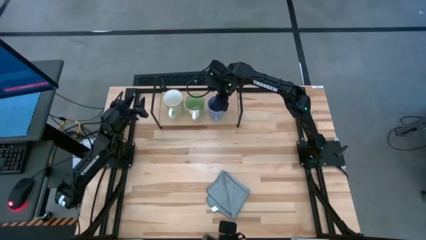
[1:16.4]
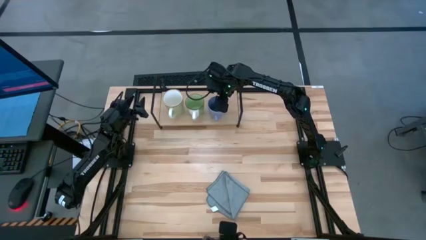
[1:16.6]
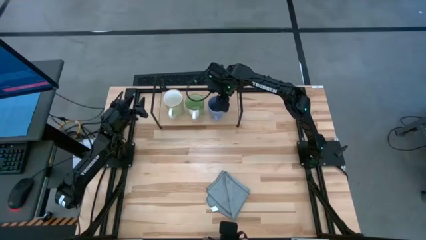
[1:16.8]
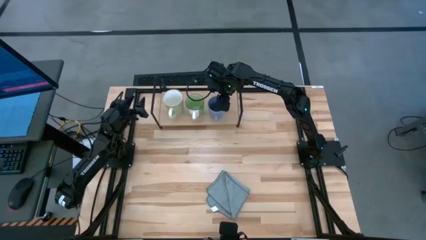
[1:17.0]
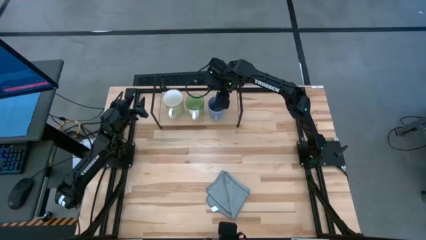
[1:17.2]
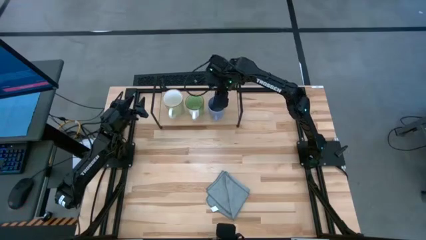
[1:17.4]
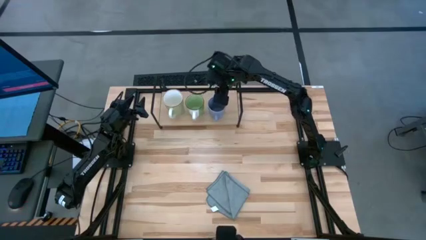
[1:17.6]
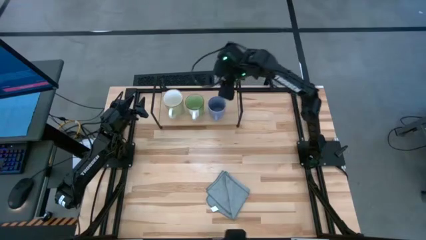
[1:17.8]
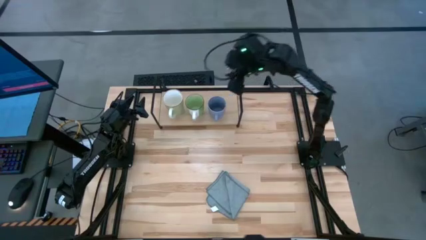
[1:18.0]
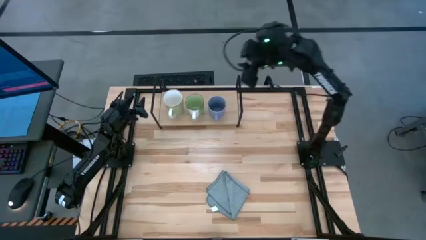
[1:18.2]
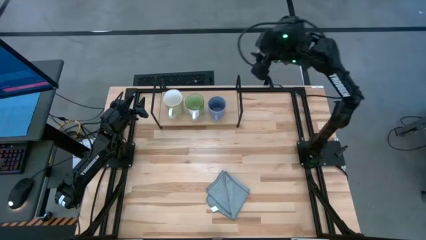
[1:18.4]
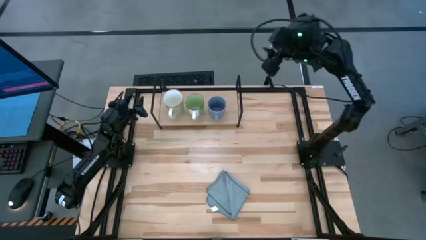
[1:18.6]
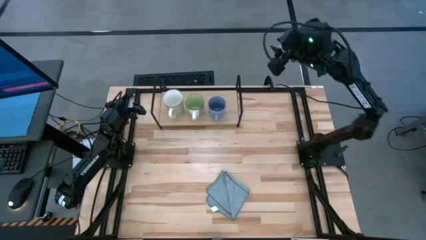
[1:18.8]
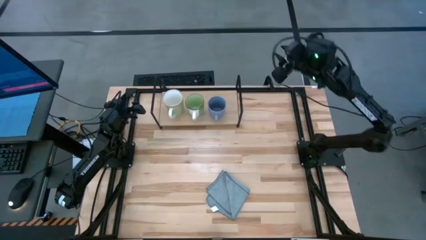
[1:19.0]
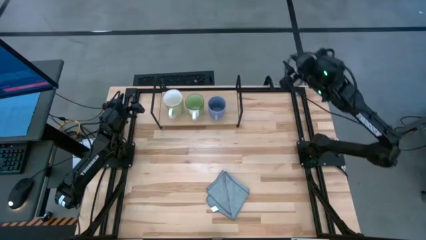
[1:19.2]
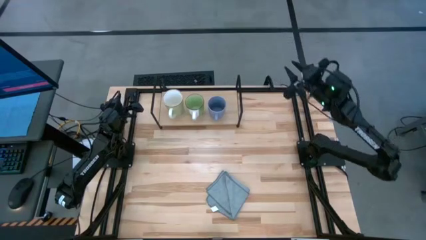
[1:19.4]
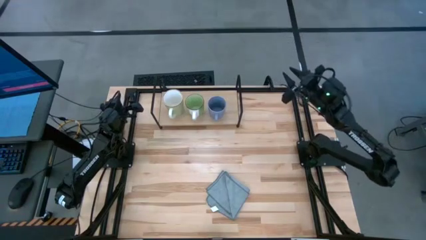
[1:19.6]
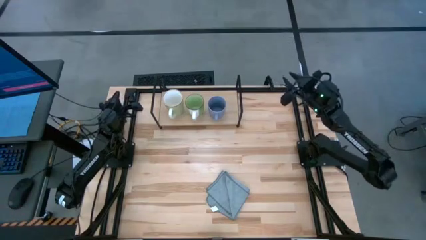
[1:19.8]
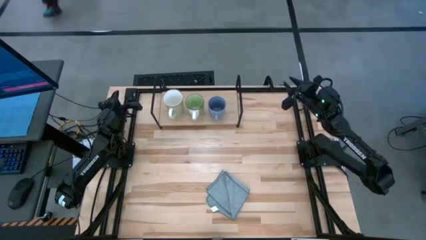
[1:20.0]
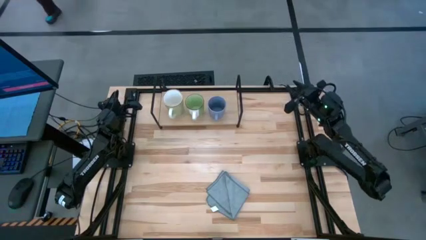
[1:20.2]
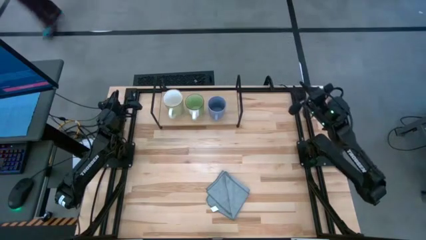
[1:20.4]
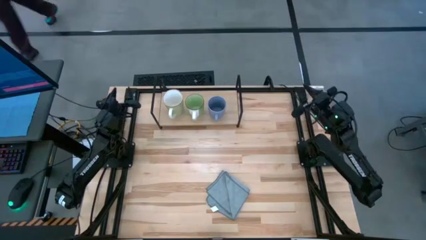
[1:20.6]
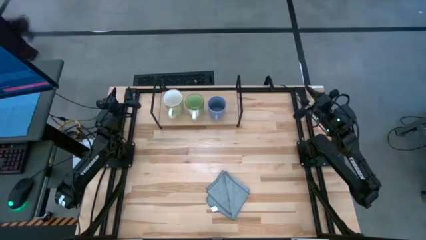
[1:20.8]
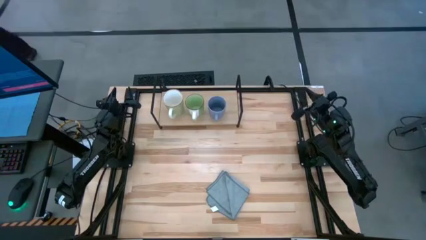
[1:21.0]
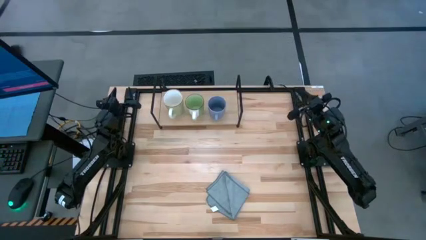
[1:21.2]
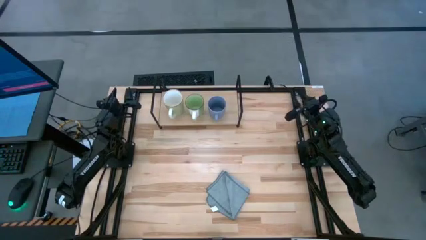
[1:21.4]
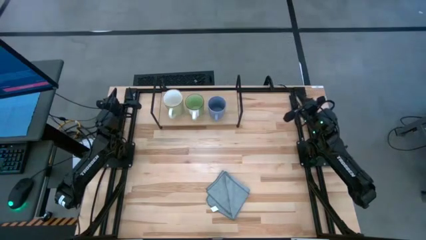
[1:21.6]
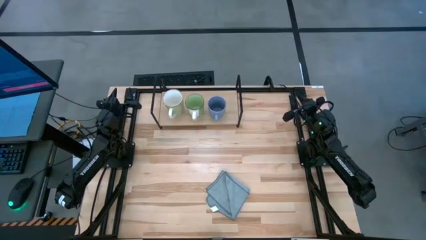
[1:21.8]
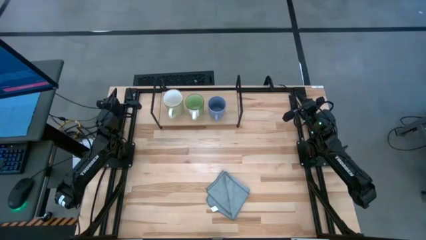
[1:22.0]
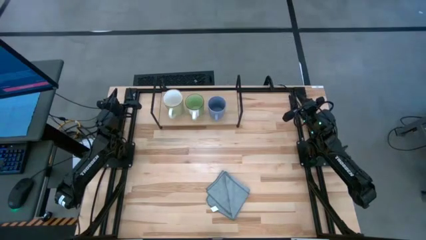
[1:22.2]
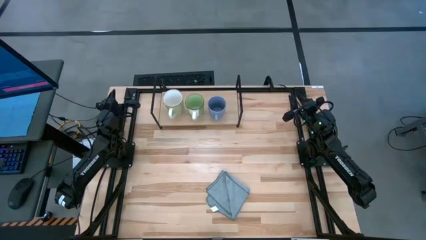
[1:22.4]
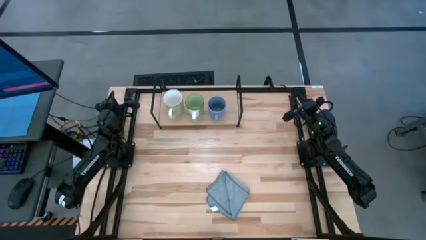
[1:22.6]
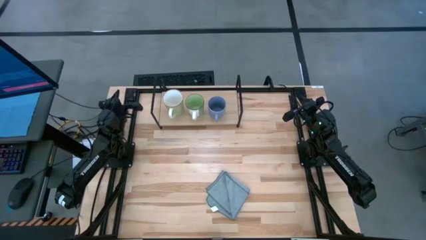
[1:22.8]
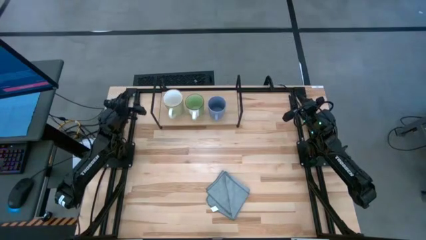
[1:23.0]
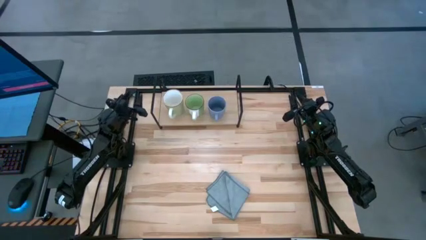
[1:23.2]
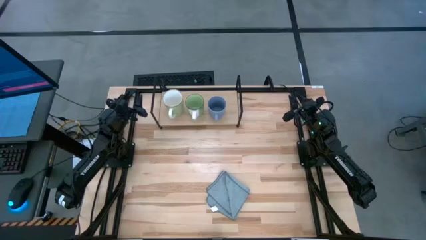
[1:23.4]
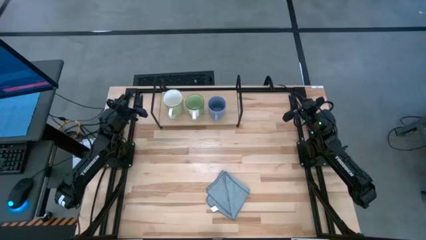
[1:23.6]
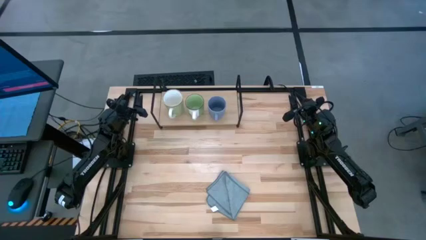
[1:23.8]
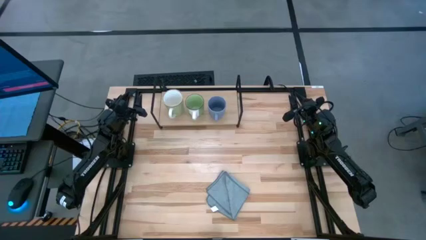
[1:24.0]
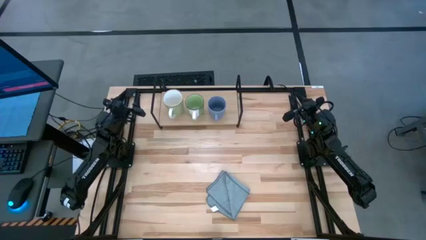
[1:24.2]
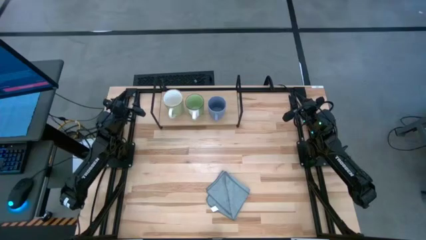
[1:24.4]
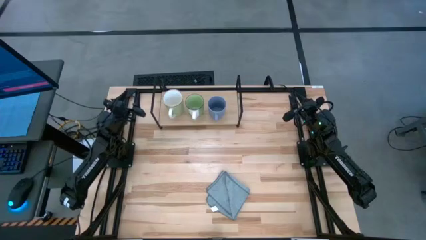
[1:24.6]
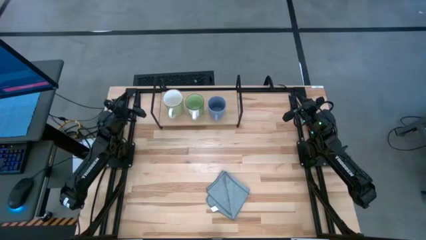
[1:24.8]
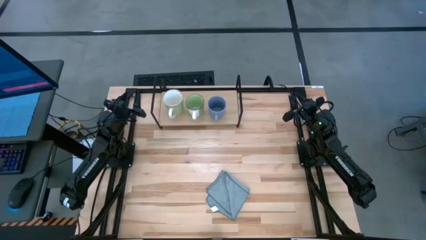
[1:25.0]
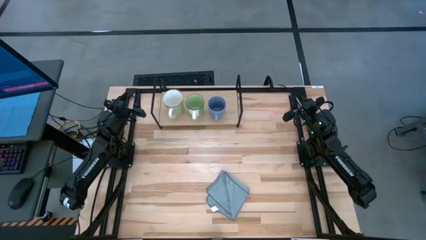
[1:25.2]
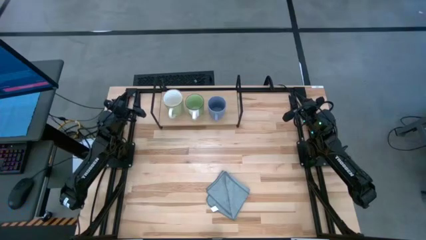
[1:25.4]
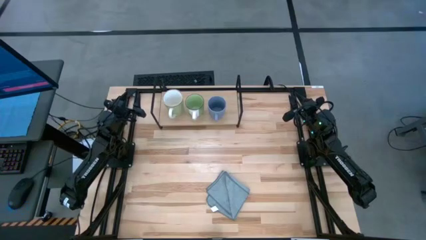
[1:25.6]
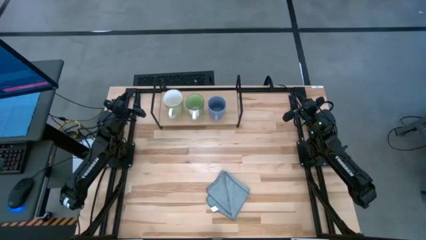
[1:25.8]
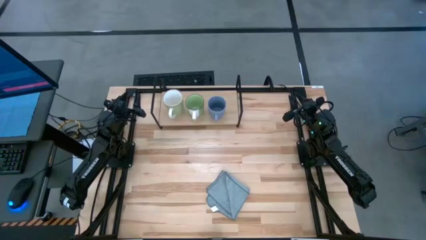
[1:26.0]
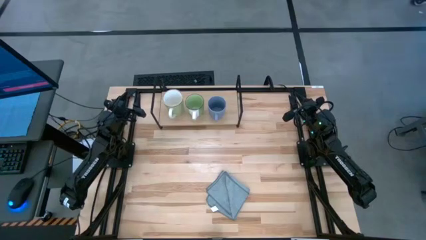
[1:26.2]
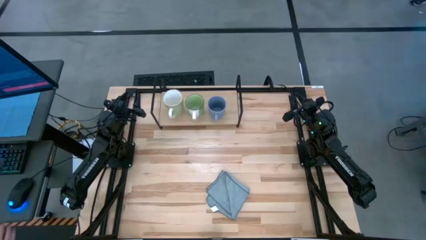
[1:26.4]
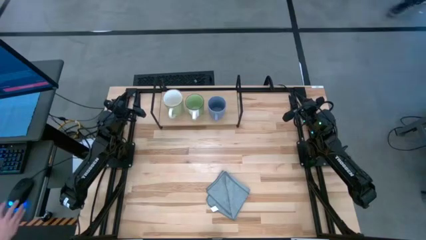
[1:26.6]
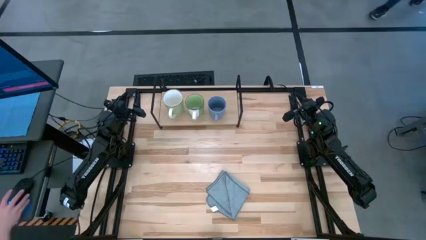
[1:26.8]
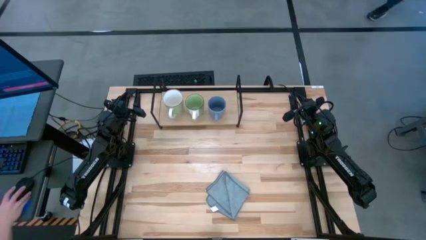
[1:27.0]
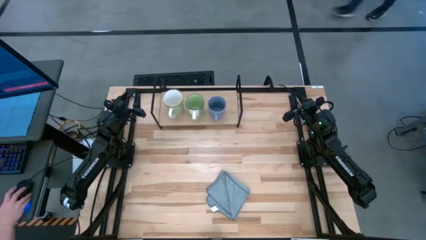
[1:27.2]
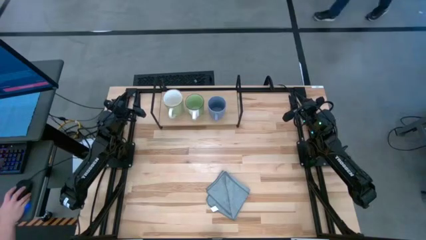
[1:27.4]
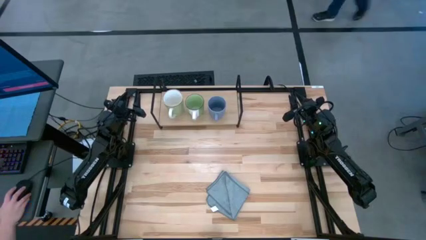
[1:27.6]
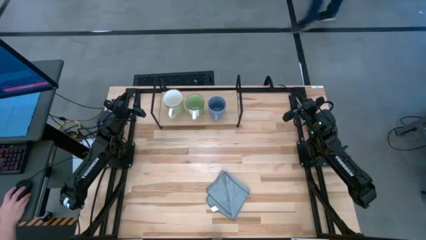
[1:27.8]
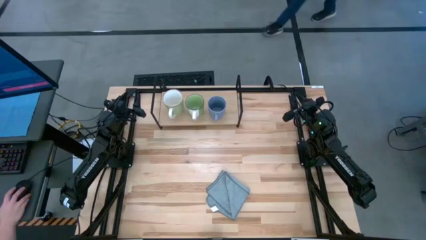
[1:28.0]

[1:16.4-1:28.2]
Task: Stack small to large cups/mugs on shelf
Return to Home Position

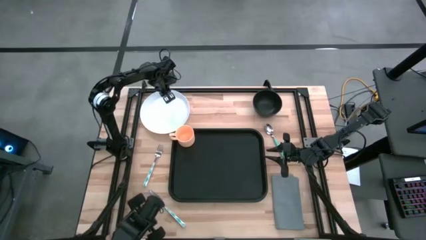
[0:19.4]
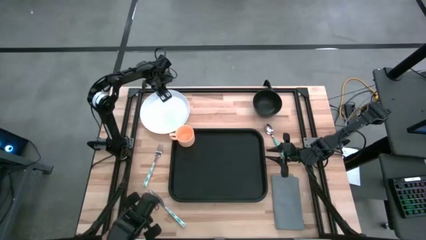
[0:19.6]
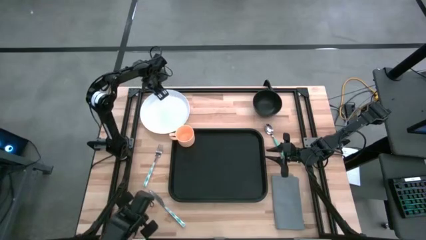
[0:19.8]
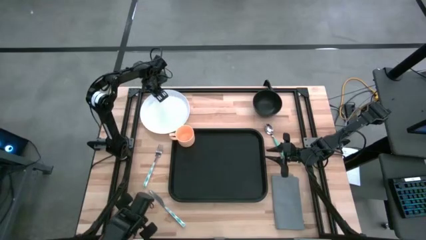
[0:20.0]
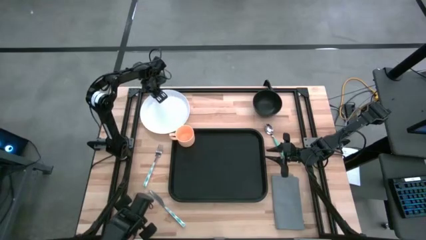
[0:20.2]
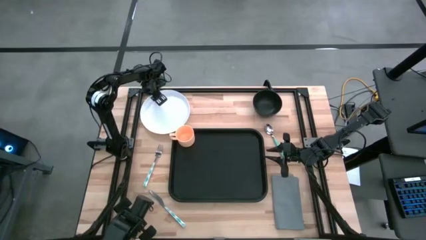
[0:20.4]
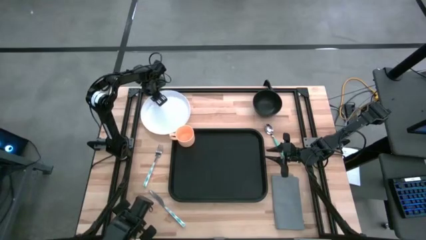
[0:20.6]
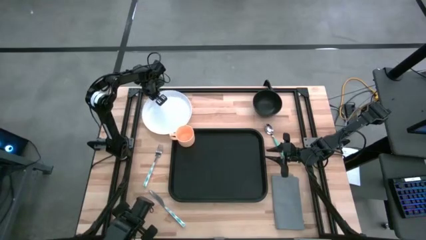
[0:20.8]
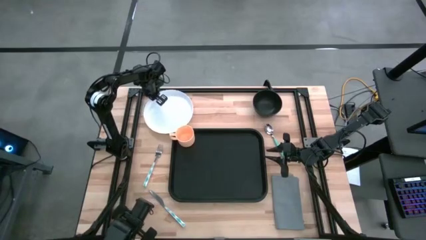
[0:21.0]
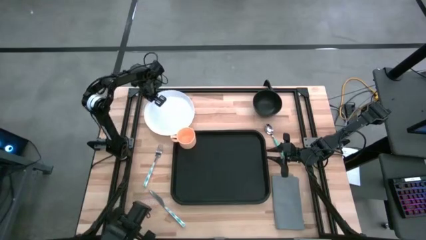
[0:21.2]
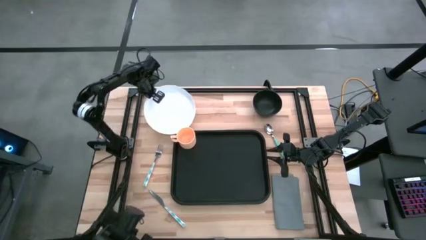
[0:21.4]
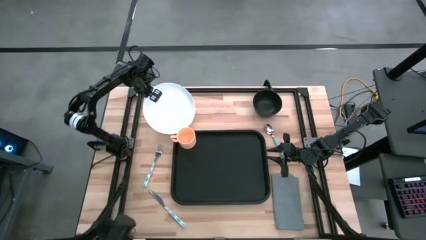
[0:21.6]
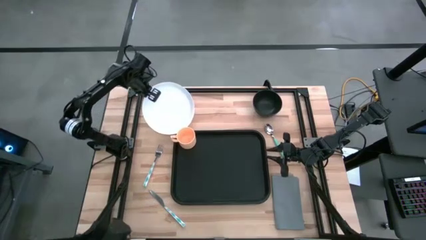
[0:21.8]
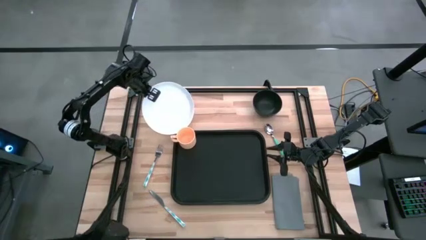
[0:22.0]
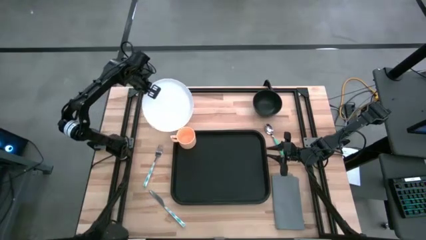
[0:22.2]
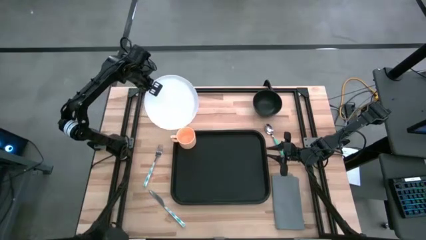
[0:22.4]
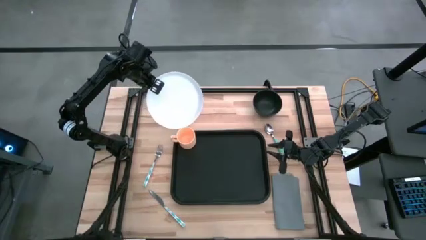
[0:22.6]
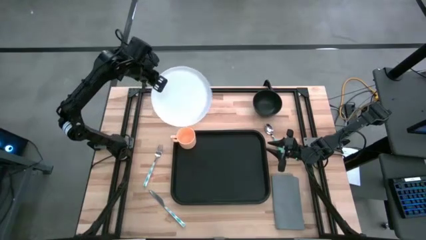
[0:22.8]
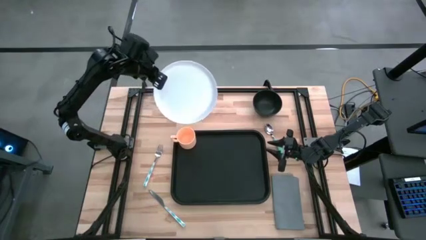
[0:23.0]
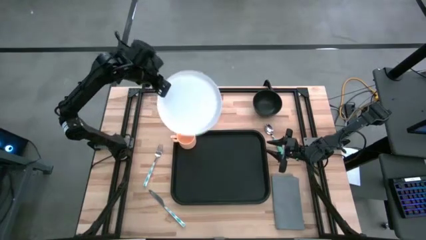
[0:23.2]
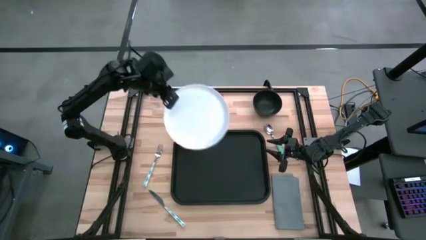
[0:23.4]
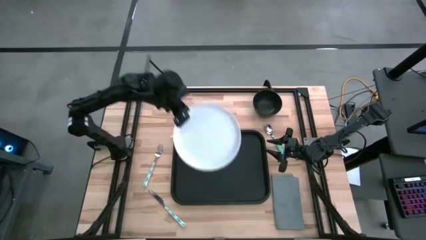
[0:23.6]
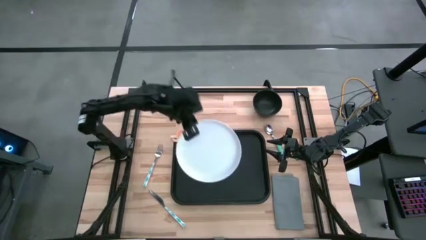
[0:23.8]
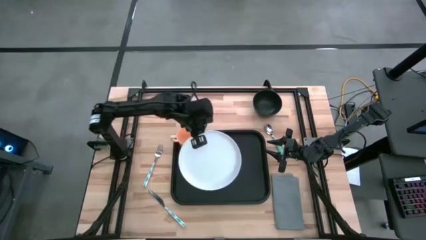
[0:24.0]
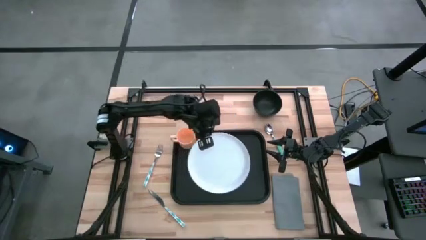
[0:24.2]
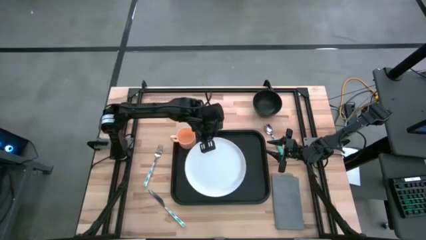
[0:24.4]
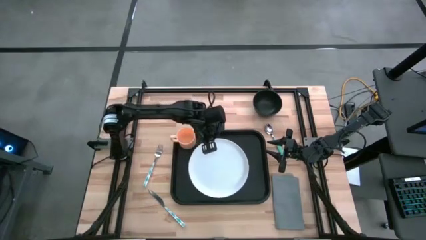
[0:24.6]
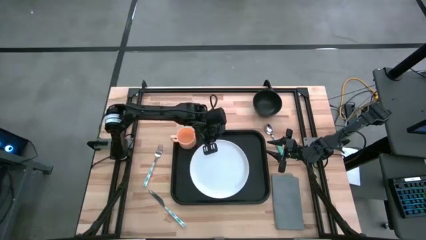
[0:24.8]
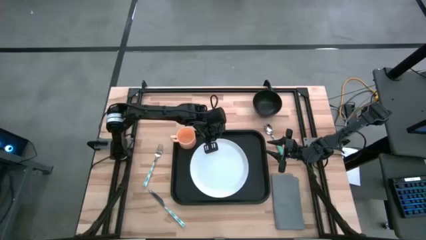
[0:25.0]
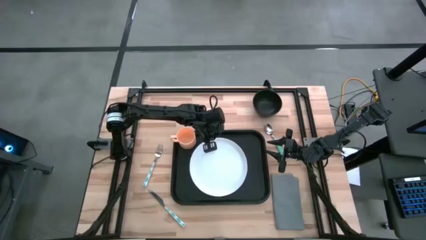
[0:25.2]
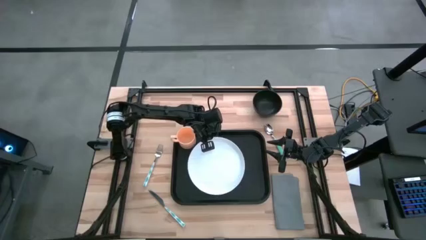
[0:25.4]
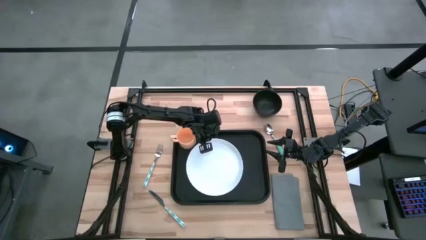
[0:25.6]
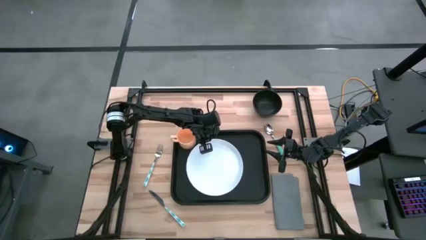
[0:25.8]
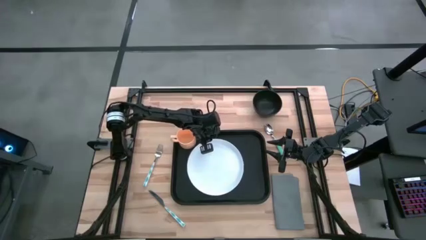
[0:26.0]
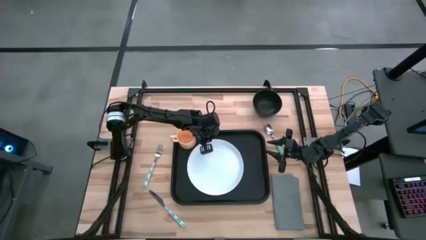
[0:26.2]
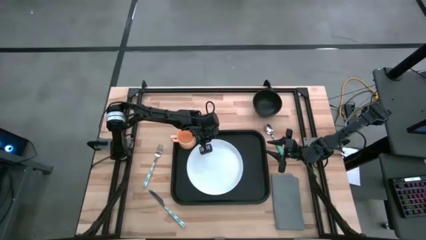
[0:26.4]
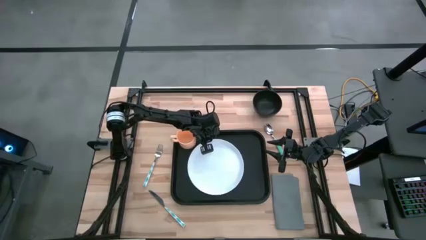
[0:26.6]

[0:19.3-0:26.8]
Task: Set up tray
Put the black bowl on top of the white plate
